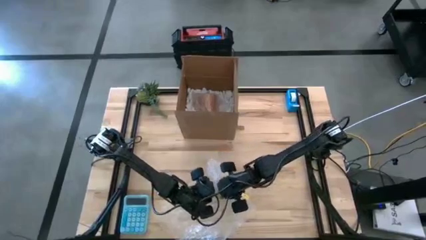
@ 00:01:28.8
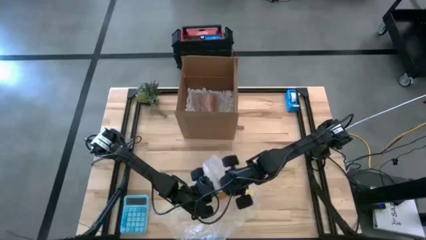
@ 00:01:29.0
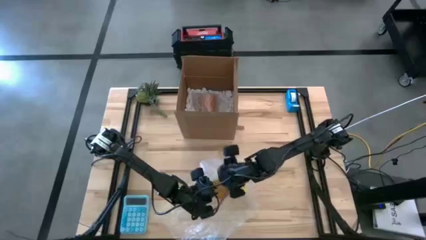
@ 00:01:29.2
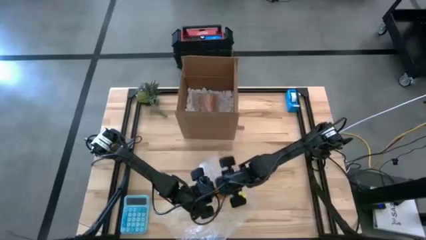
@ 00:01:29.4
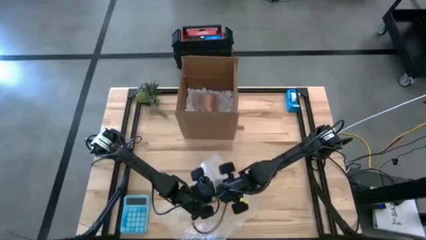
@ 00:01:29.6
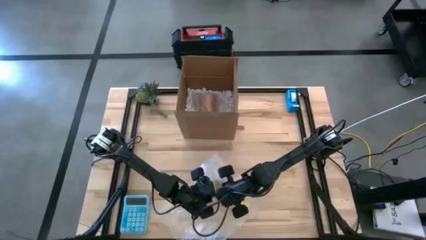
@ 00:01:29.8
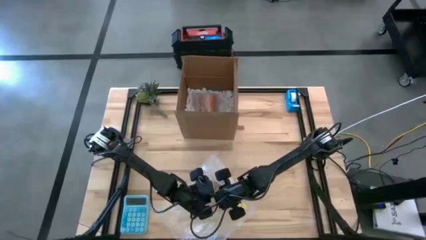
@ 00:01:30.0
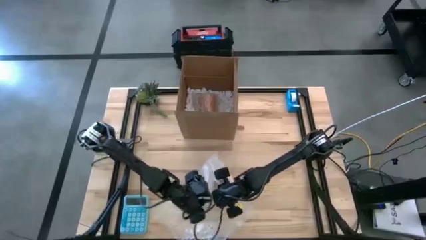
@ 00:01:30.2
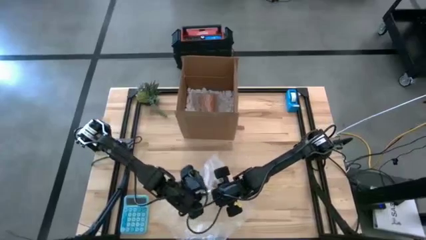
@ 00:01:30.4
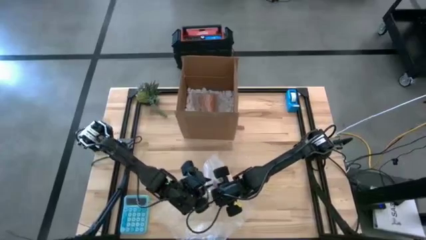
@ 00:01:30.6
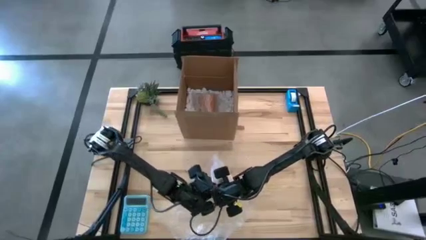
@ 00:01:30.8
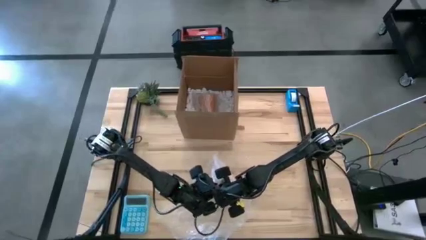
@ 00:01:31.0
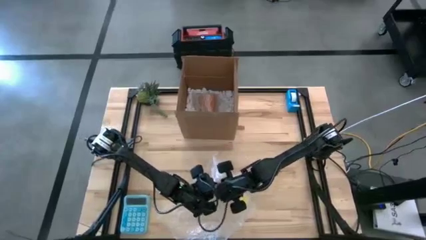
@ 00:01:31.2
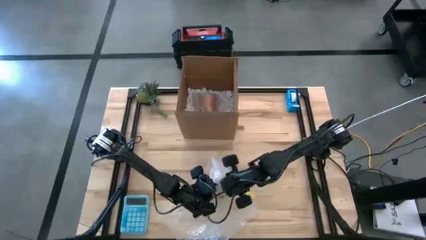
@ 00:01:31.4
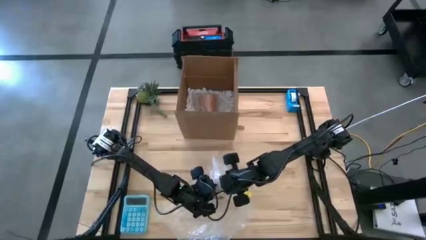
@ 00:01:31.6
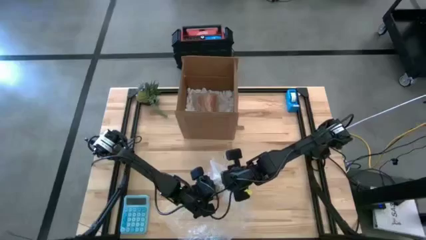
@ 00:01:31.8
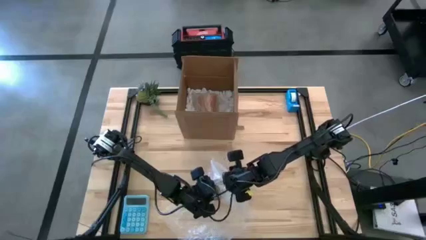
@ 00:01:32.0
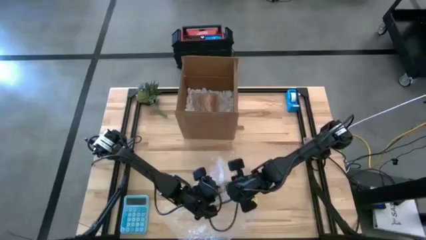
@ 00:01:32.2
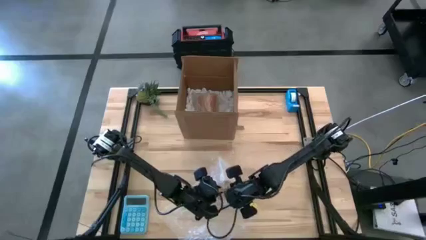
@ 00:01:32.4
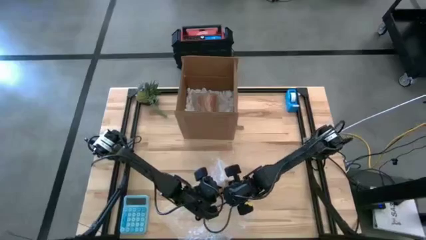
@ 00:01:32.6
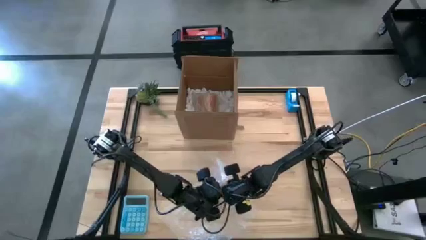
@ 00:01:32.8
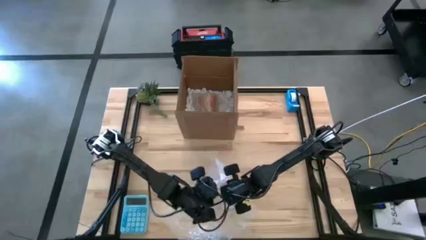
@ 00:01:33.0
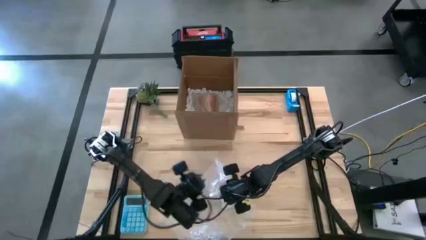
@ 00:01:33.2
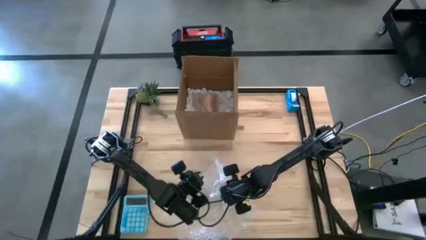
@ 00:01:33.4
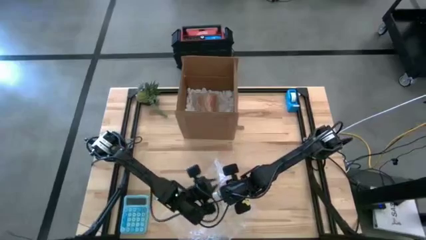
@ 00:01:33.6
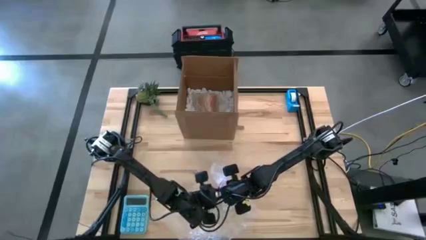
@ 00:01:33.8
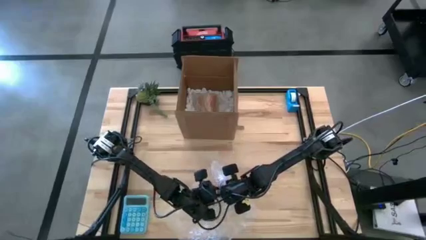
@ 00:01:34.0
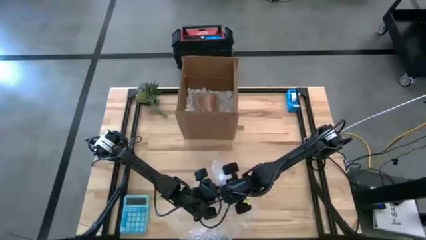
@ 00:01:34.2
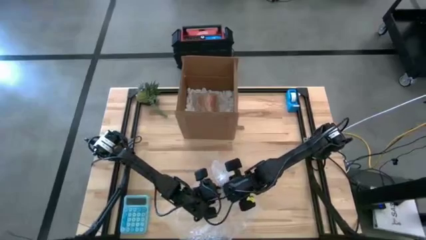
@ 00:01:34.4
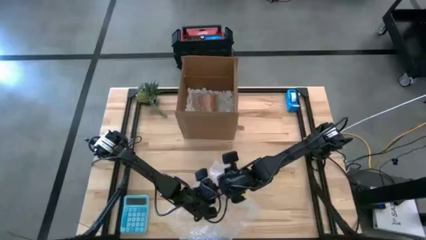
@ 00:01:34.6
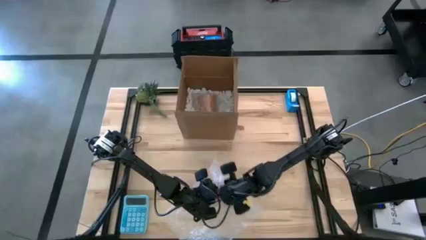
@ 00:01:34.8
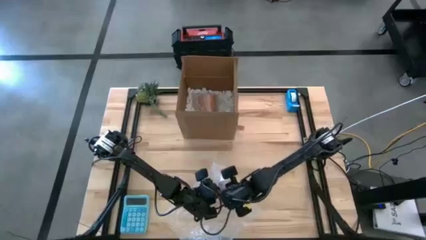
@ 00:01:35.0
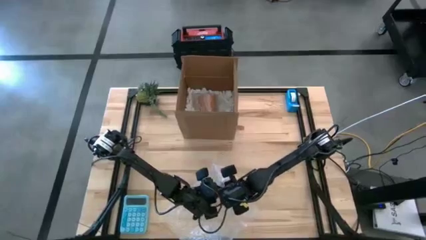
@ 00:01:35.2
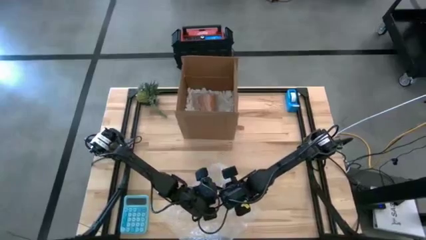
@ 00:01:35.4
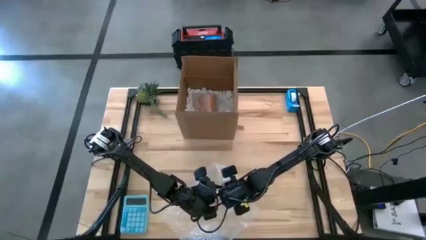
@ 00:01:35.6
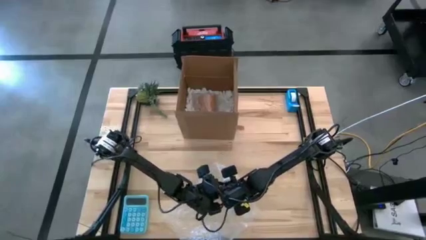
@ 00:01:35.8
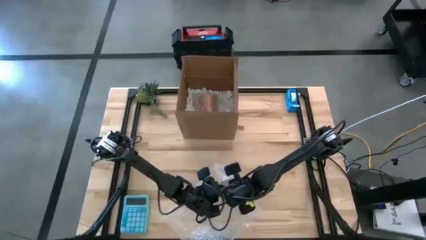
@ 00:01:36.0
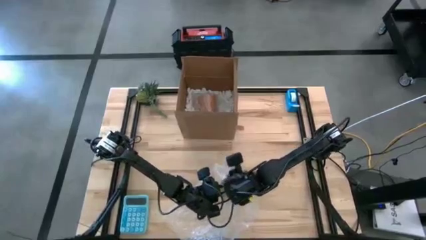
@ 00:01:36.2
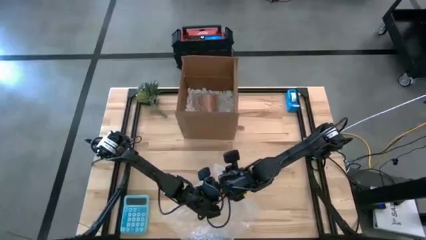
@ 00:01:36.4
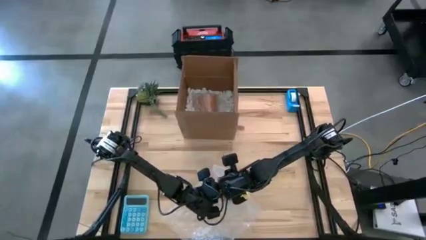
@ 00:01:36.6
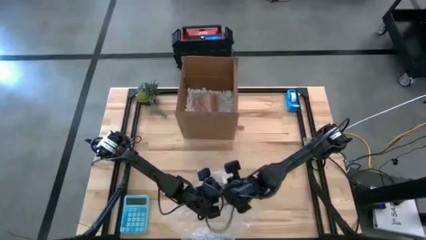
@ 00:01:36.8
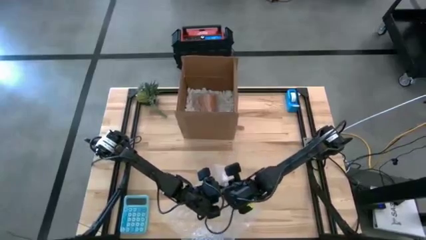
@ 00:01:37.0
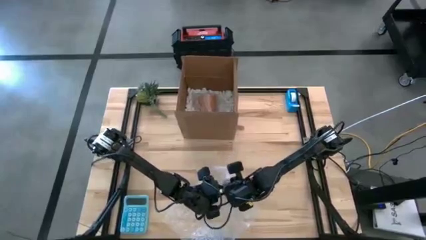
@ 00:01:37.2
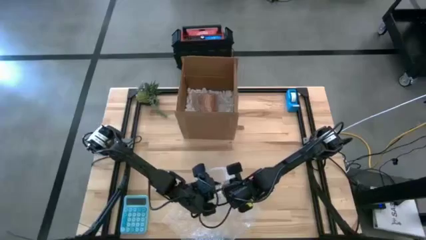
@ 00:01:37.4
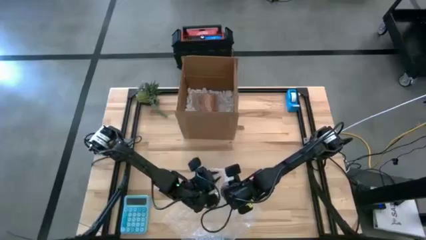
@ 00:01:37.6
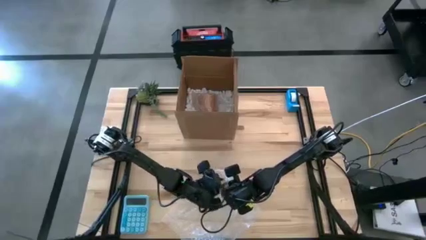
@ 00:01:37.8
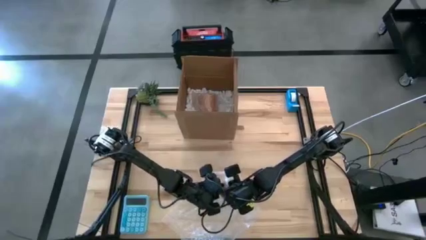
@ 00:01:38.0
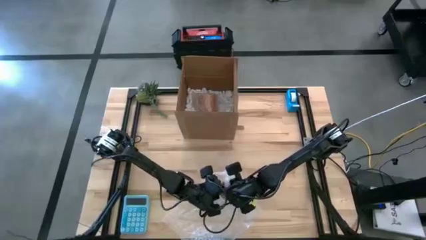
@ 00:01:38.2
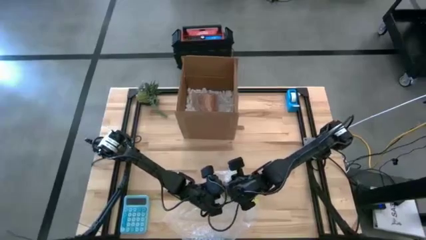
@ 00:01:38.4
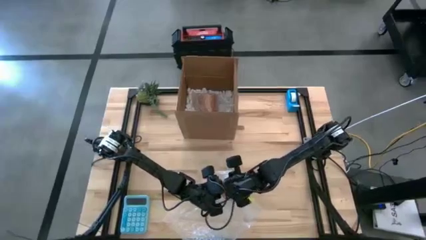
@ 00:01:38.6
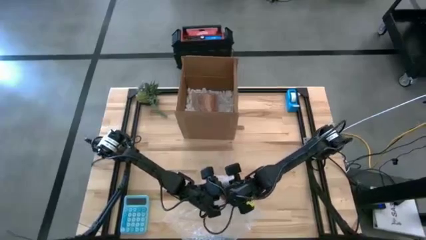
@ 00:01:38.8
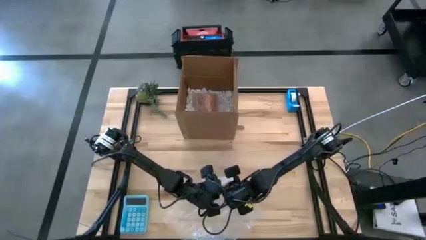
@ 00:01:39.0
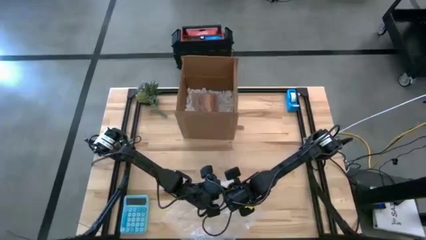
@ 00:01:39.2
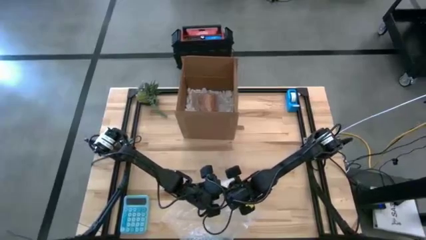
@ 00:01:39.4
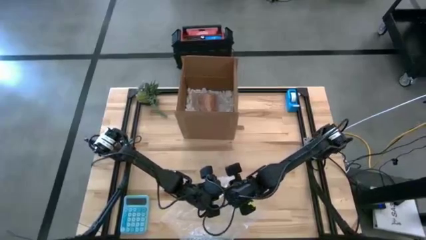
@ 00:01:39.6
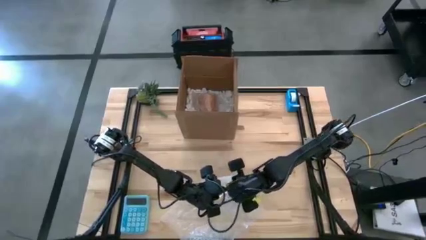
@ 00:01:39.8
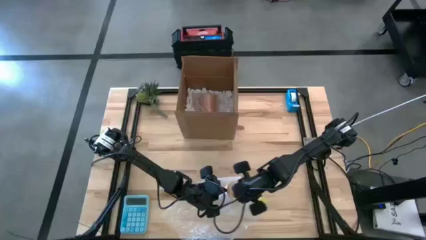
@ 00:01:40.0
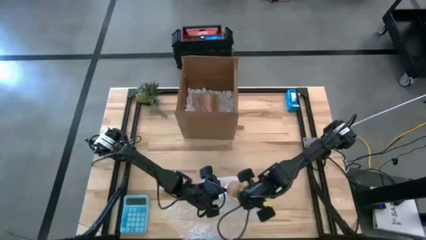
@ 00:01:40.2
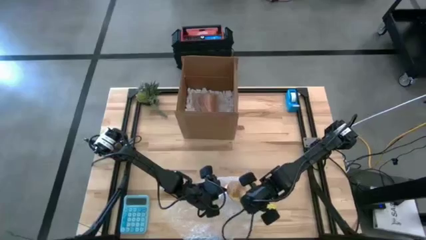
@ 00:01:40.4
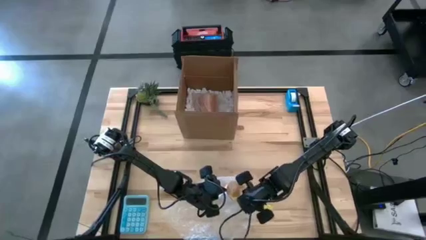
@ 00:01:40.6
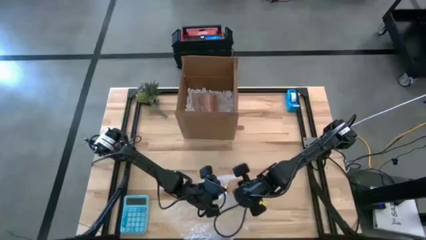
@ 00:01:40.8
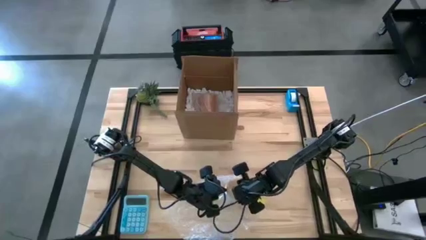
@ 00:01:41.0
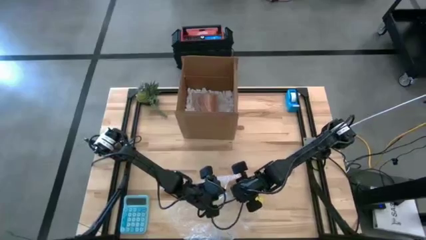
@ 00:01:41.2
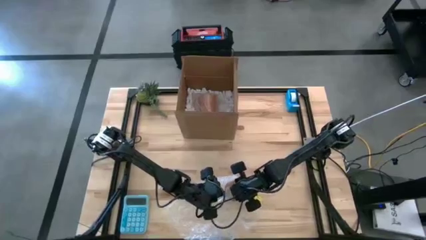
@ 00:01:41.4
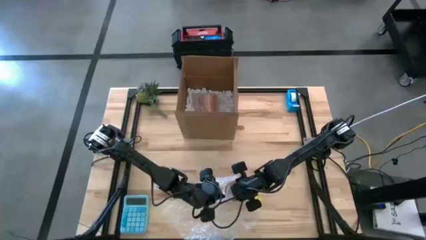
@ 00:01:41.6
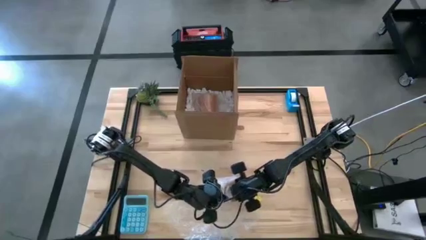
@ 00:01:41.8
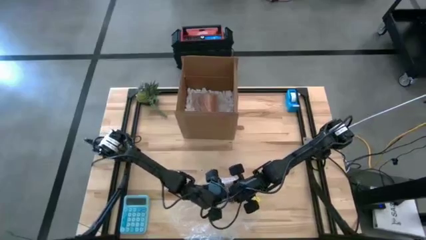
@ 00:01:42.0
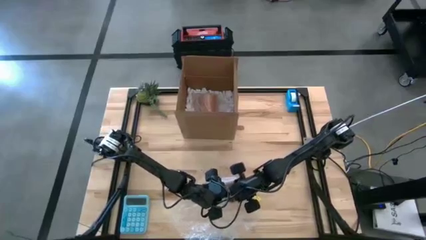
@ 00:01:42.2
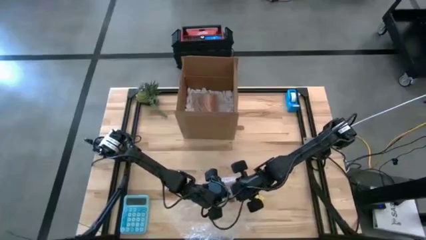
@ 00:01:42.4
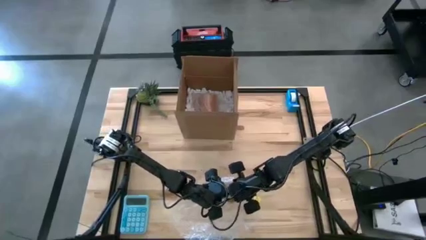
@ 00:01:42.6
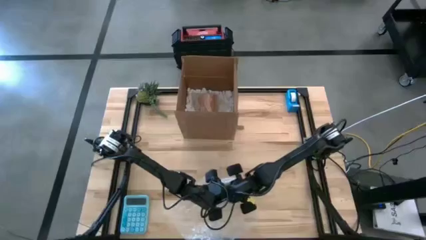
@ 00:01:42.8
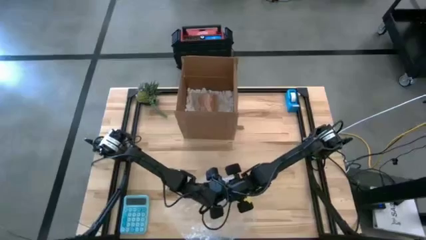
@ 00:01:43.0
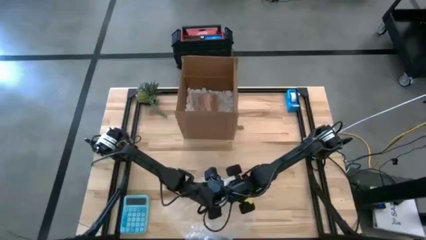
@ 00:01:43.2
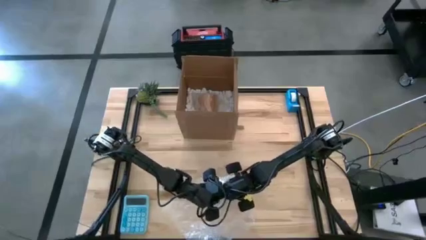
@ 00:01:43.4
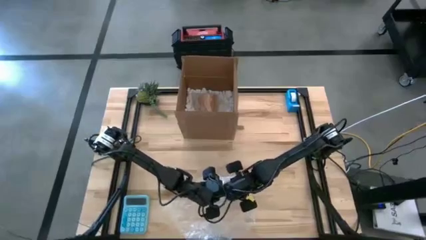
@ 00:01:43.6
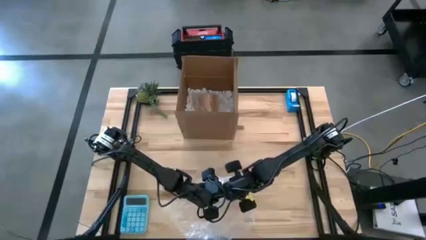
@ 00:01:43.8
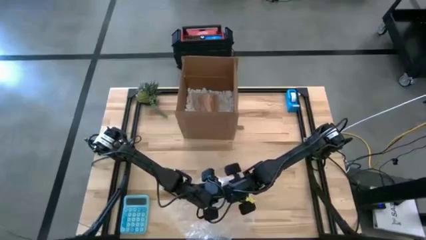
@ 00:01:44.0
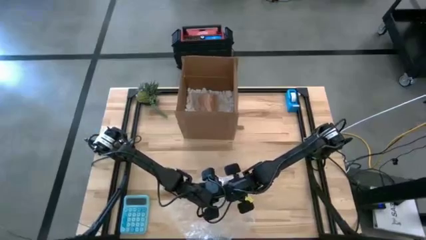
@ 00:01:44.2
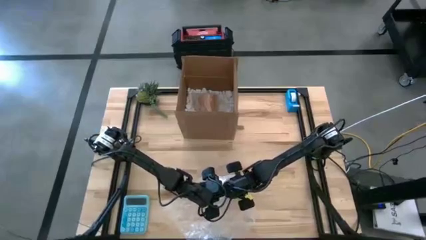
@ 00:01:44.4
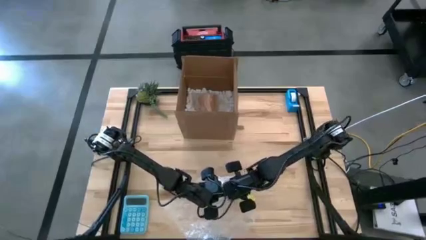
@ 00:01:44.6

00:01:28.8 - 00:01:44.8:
Task: wrap mug
Wrap the yellow mug with bubble wrap
